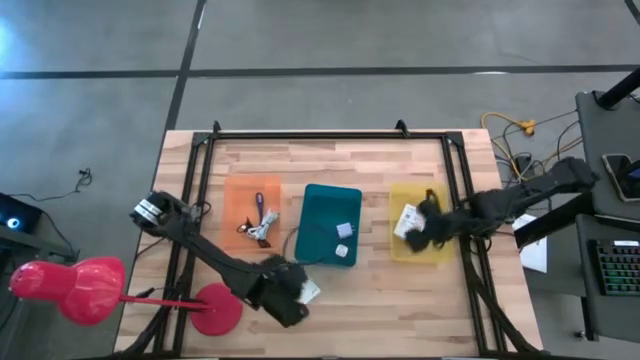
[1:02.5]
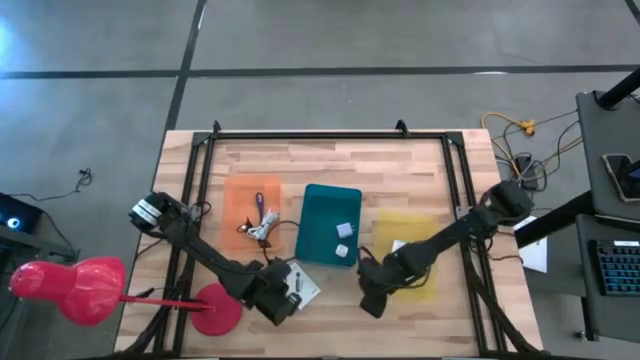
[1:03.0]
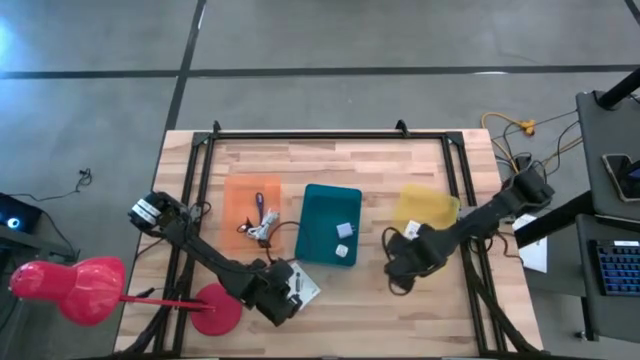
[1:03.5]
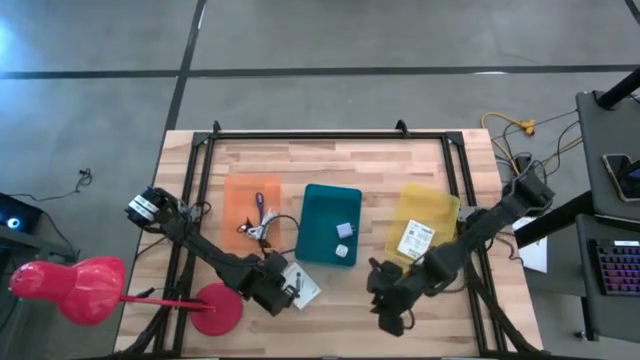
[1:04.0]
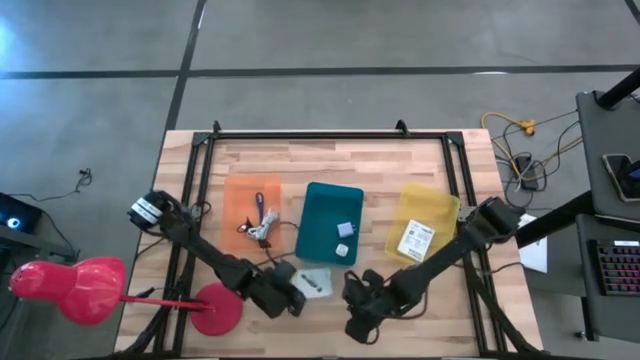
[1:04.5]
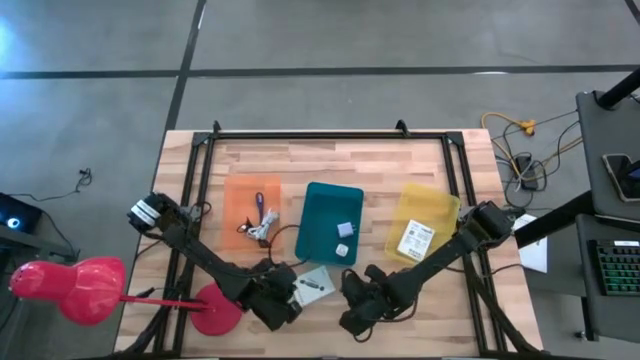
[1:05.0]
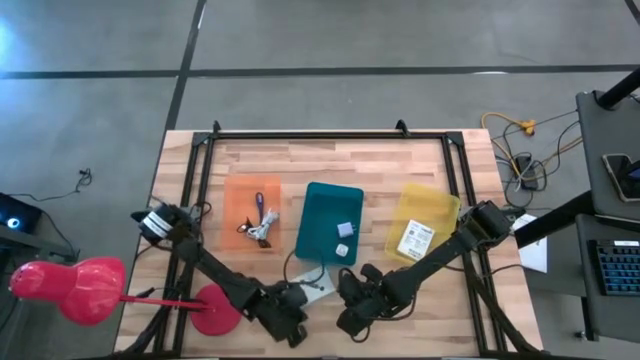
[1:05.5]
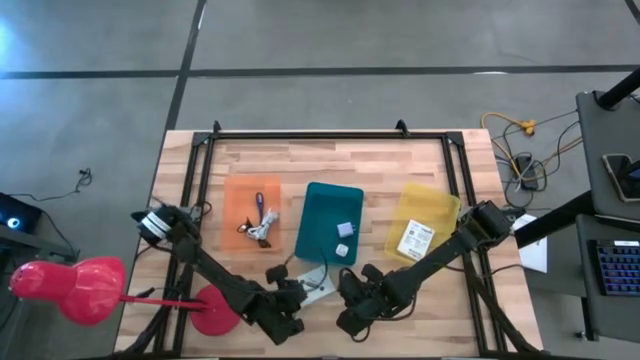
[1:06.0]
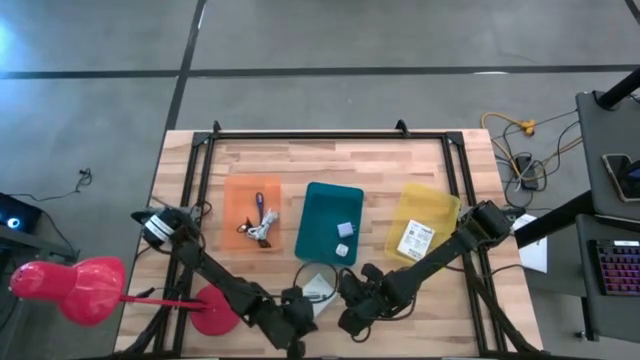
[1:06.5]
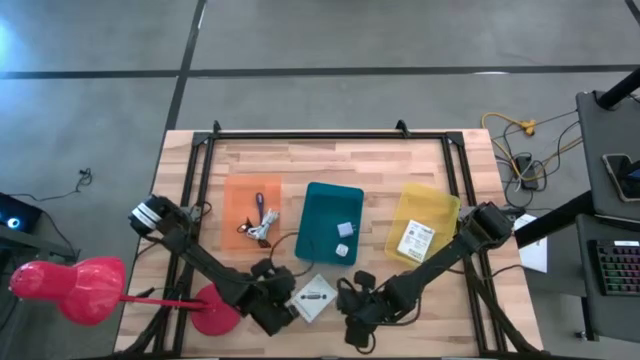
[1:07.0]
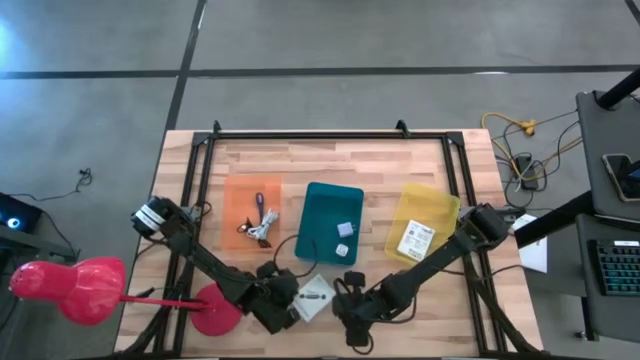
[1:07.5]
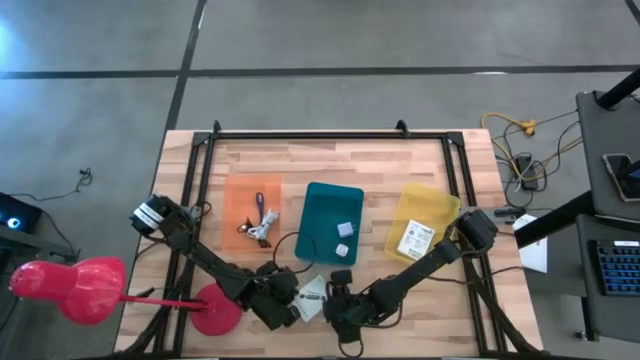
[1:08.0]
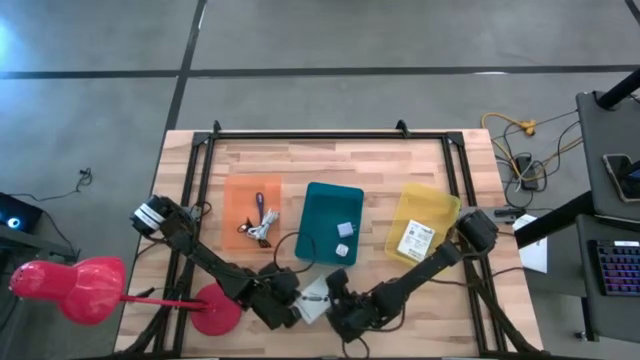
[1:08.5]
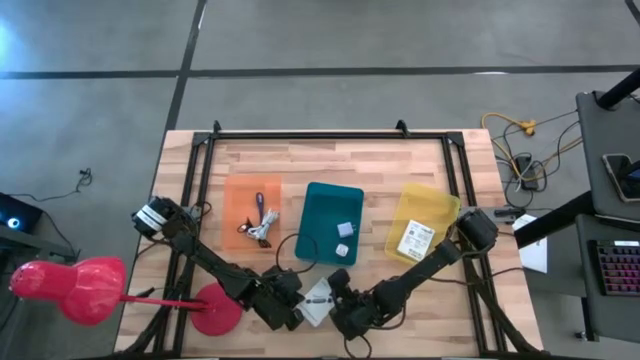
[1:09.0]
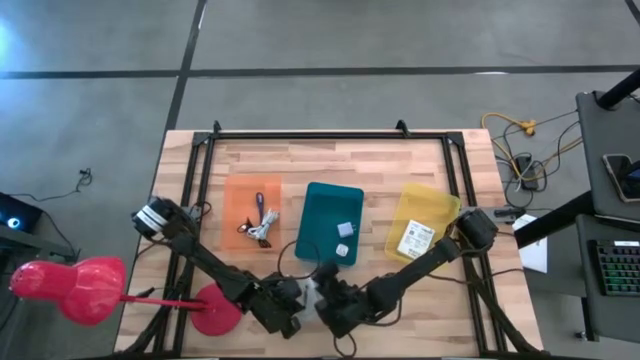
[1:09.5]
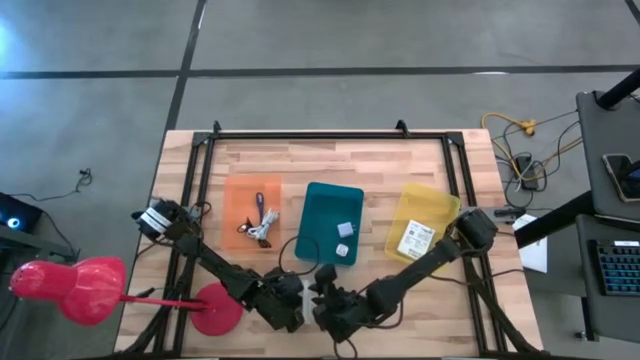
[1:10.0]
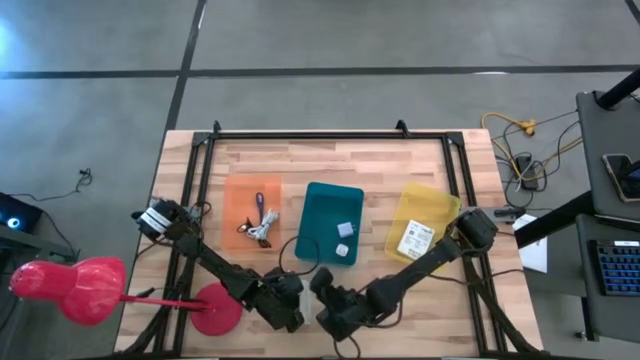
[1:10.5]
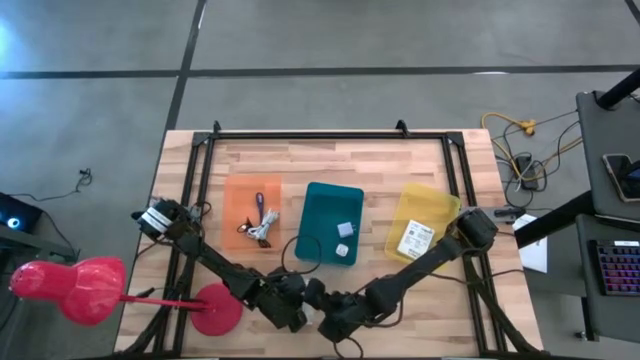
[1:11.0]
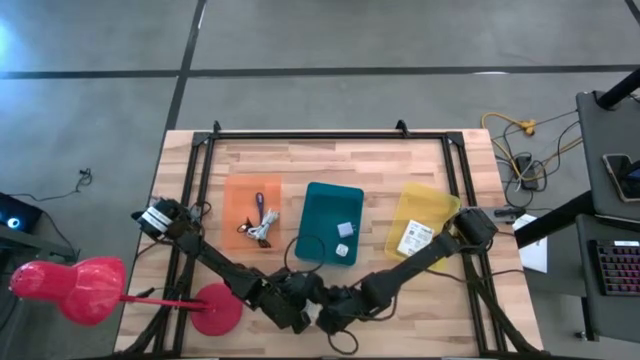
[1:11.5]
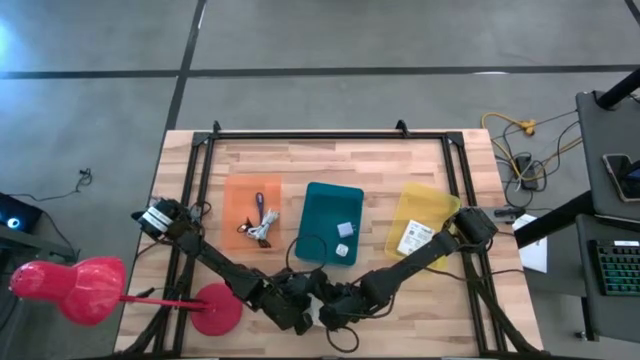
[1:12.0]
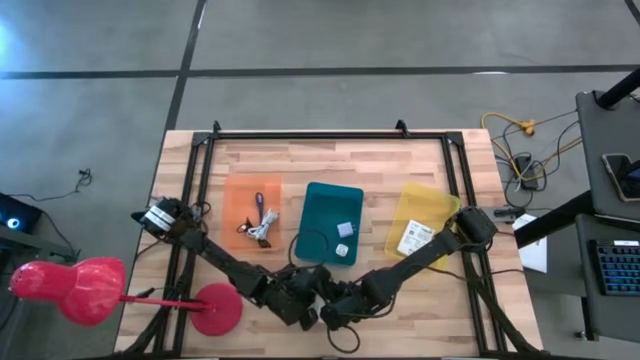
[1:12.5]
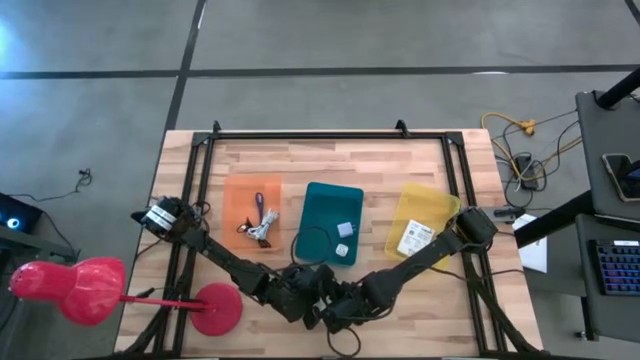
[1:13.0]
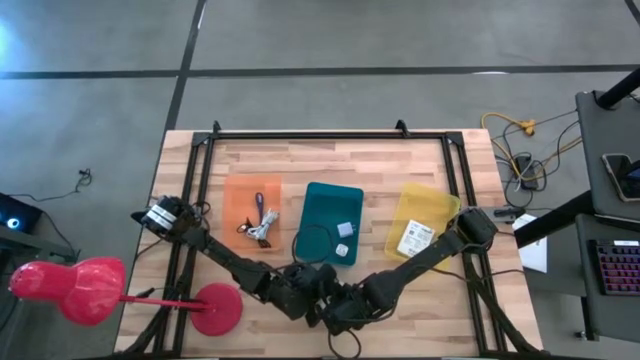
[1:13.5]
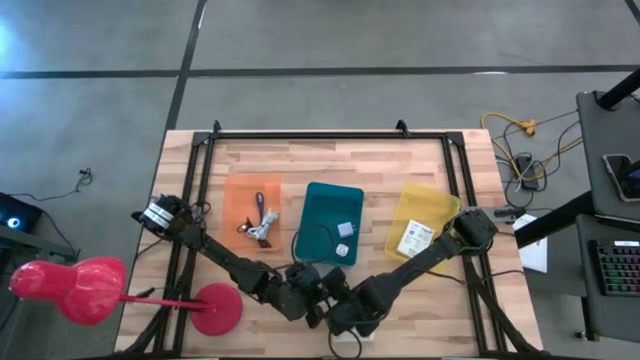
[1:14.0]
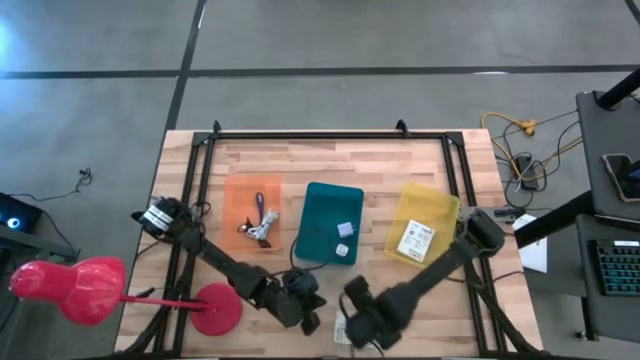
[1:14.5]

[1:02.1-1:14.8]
Task: Pick and place items into bin
Put the card reader box into the yellow bin

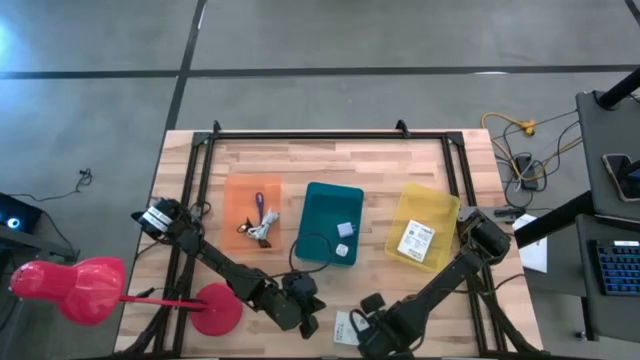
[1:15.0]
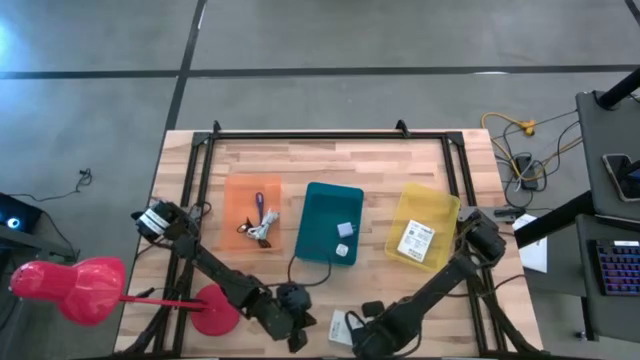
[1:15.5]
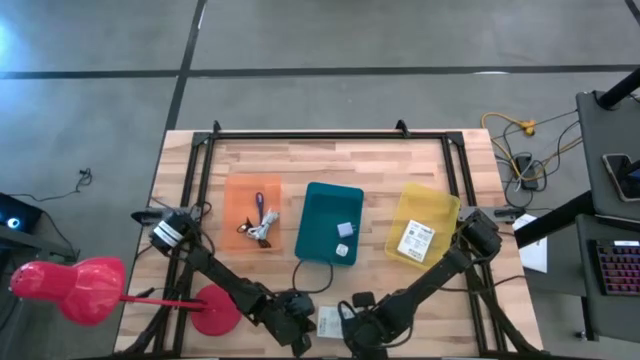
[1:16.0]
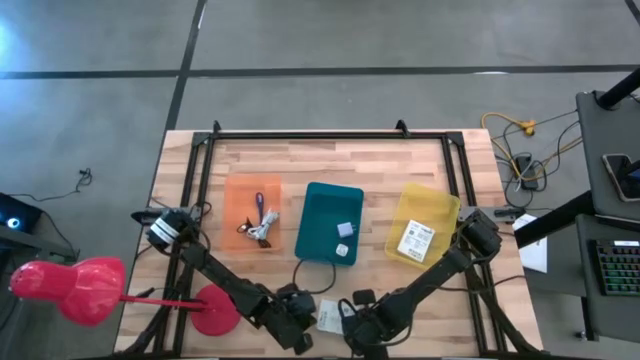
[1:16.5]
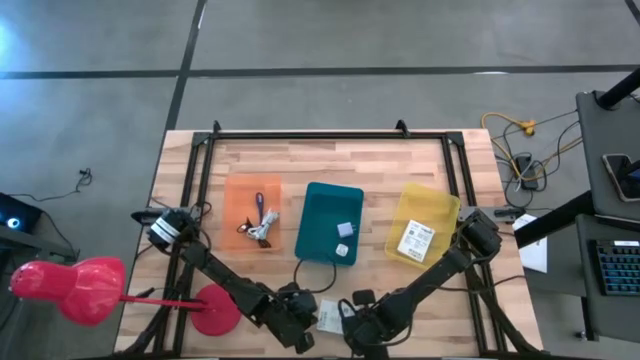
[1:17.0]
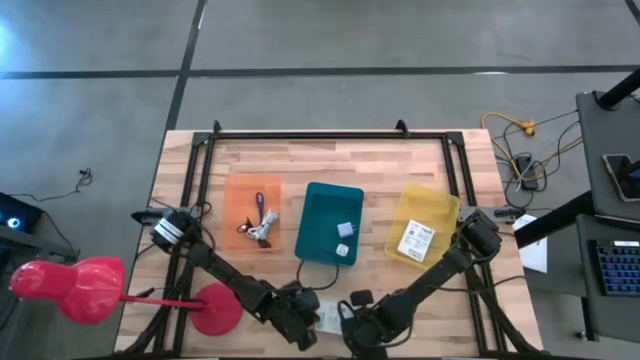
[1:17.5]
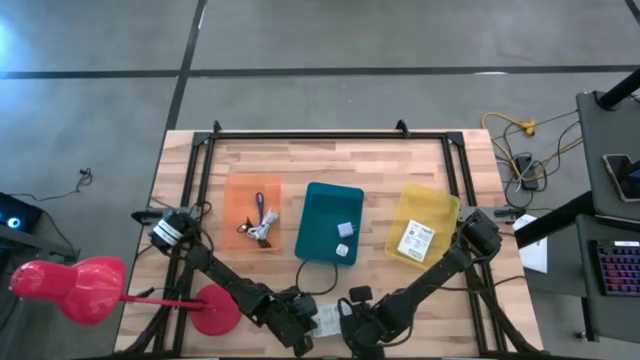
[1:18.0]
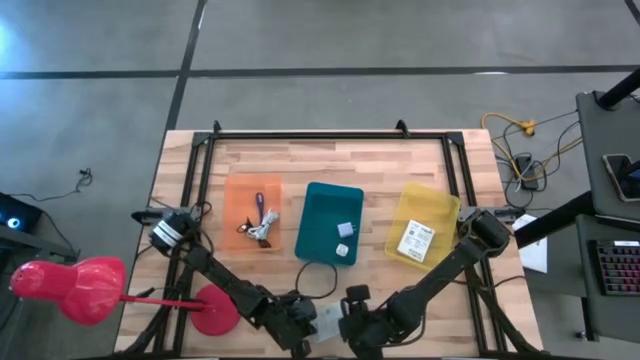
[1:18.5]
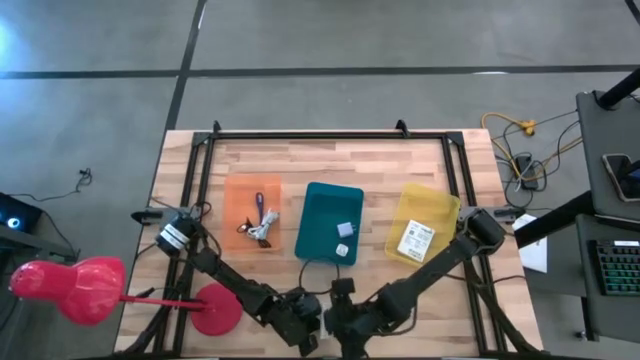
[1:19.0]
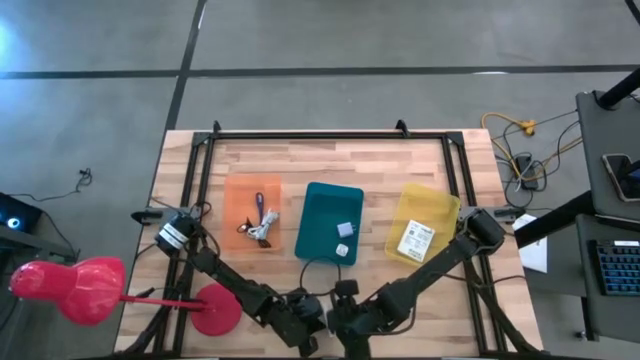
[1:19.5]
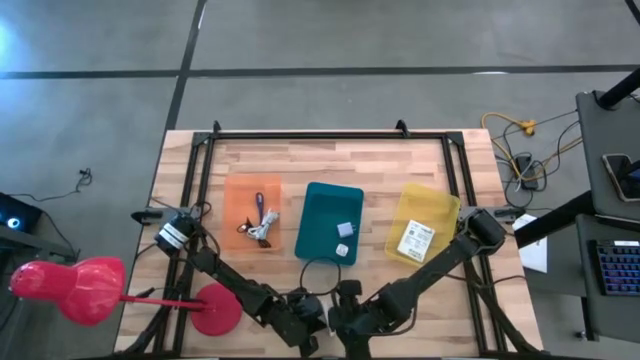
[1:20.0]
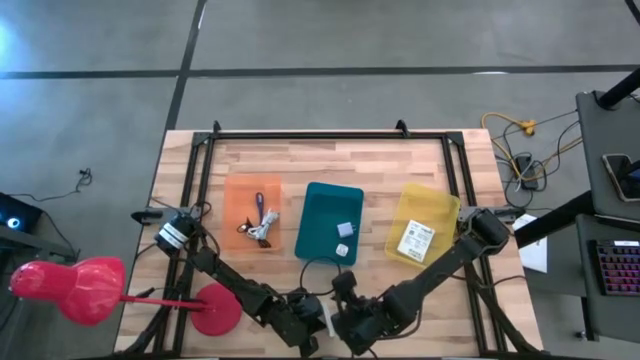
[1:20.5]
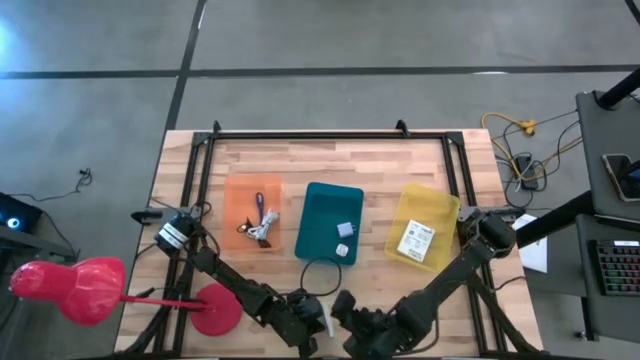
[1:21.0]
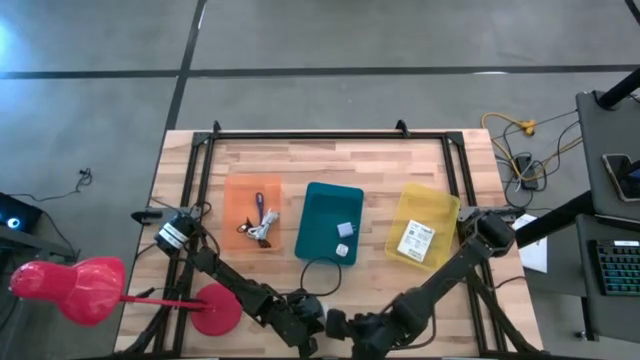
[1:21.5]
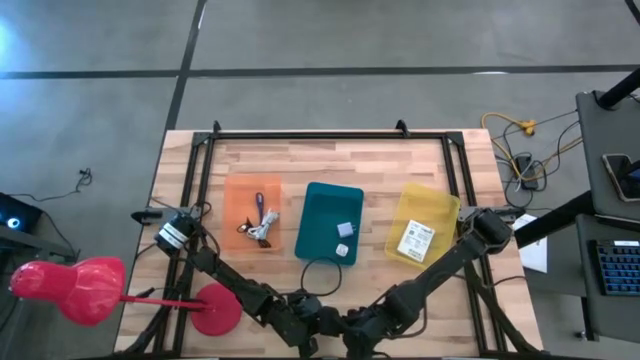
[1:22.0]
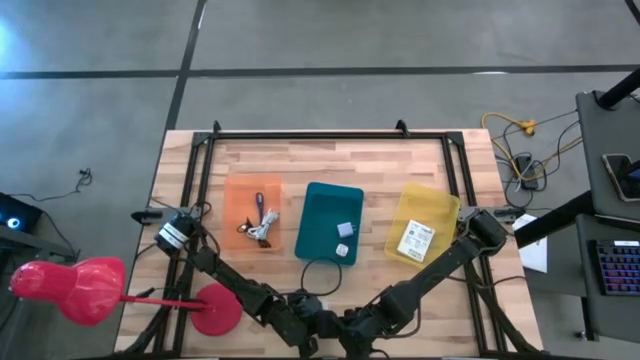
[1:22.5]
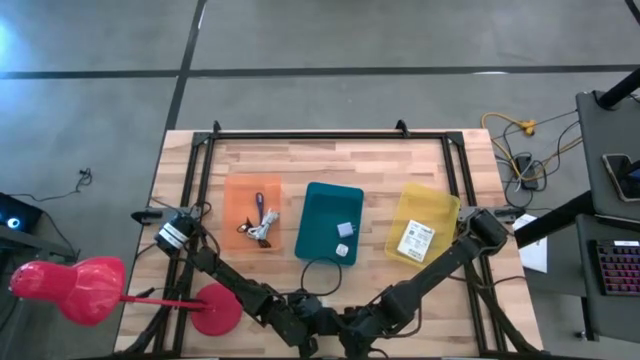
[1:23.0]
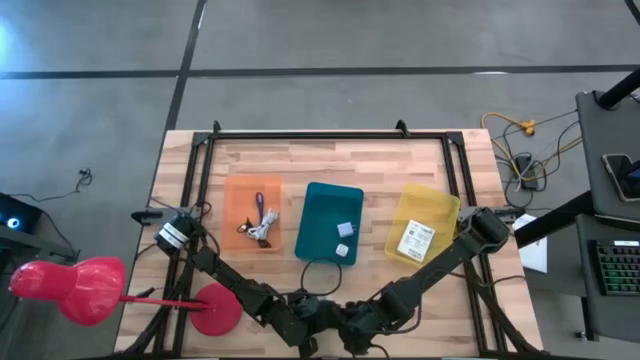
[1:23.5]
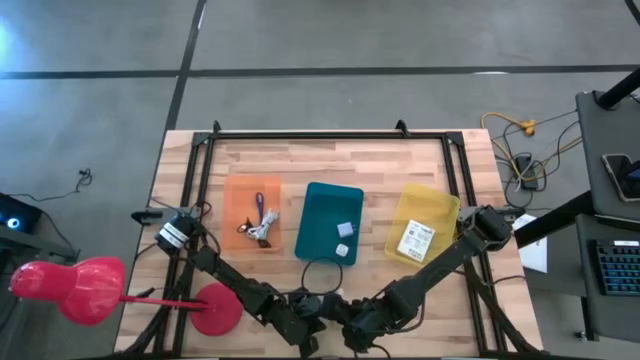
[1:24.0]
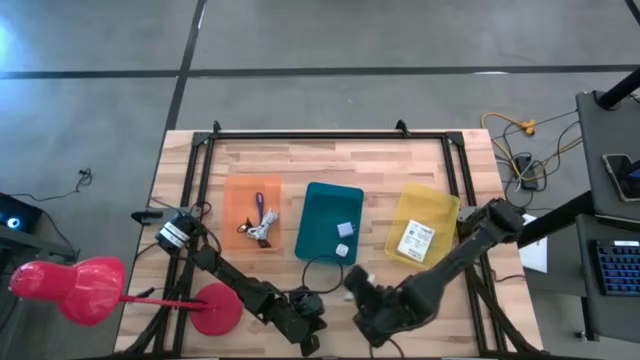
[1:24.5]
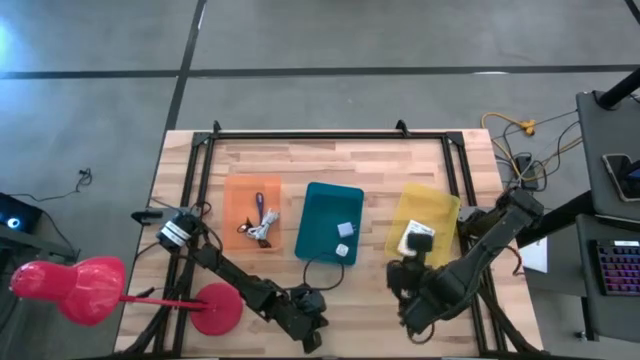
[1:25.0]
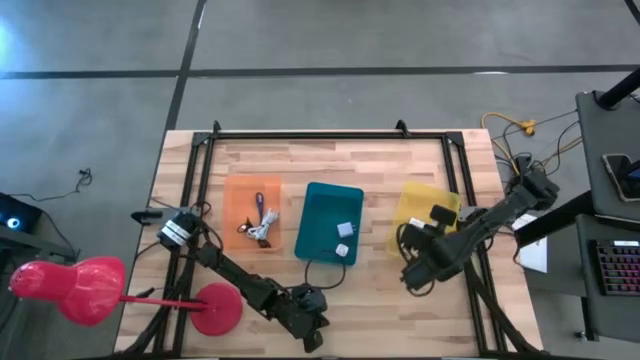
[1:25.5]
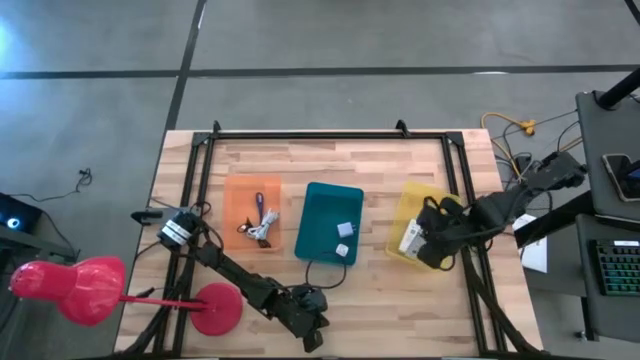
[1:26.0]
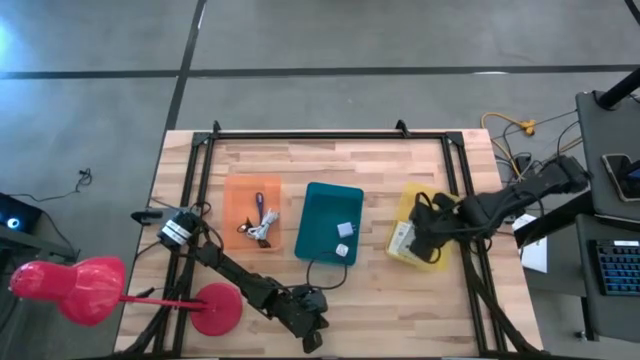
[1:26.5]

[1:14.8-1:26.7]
Put the card reader box into the yellow bin
